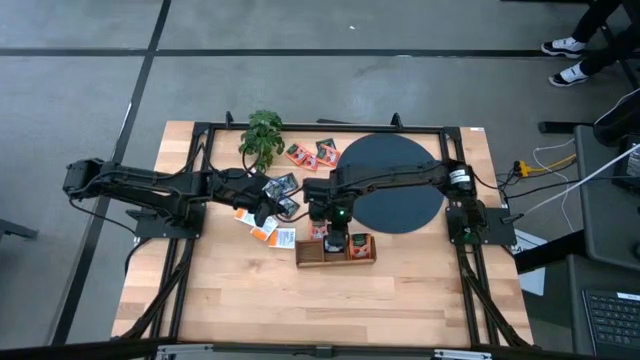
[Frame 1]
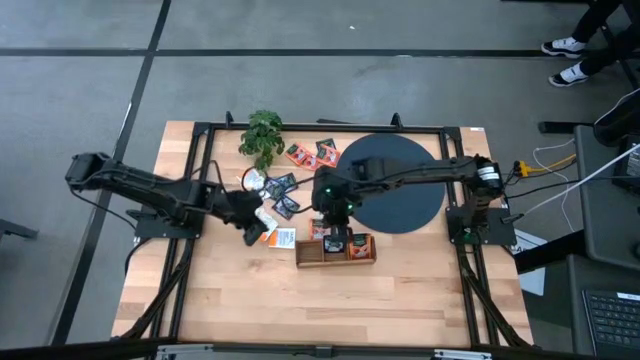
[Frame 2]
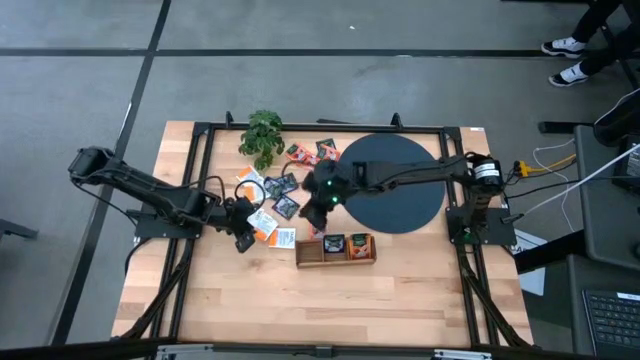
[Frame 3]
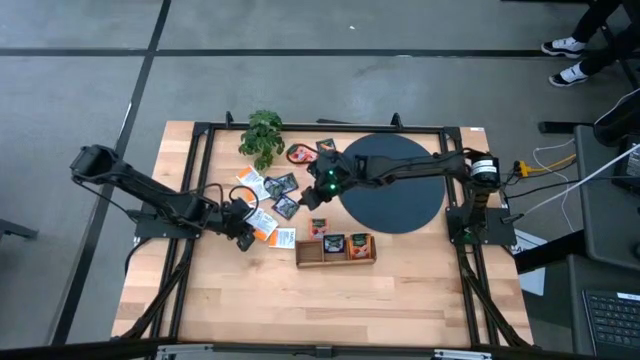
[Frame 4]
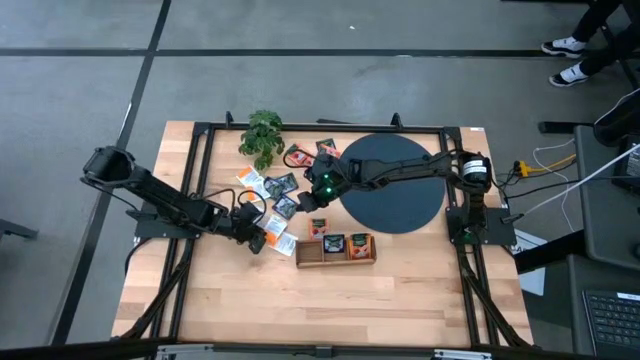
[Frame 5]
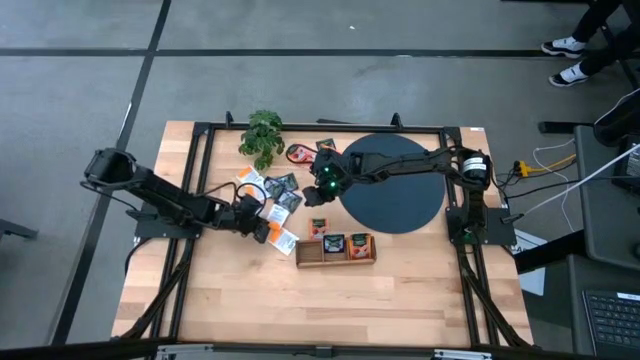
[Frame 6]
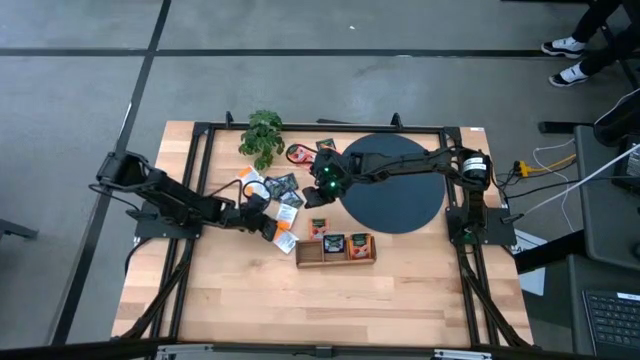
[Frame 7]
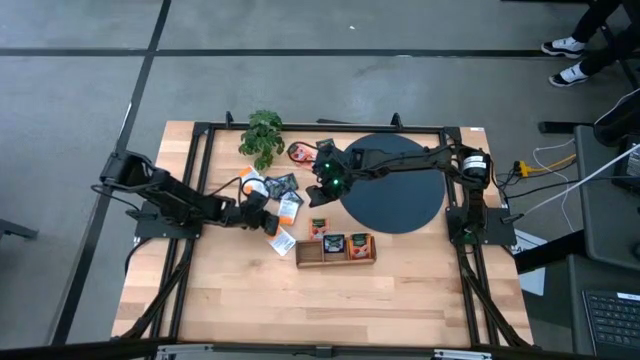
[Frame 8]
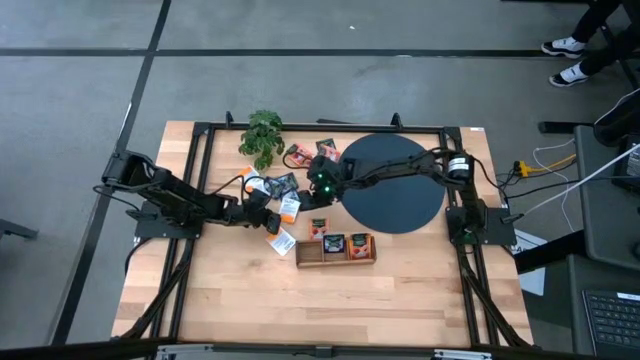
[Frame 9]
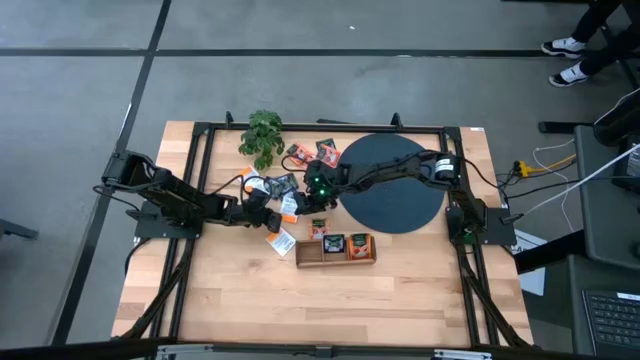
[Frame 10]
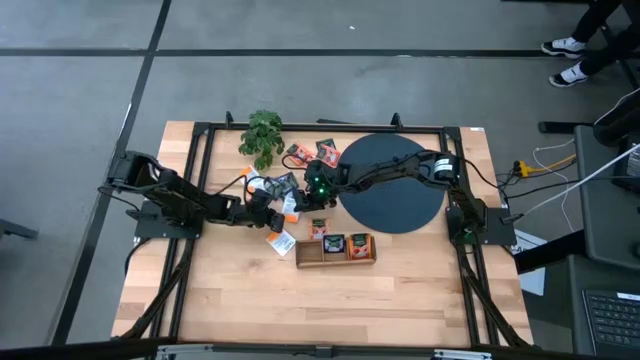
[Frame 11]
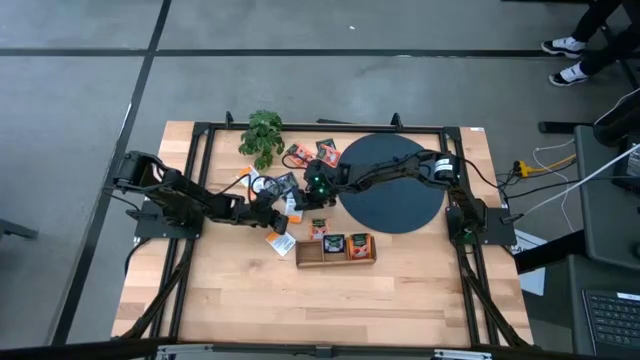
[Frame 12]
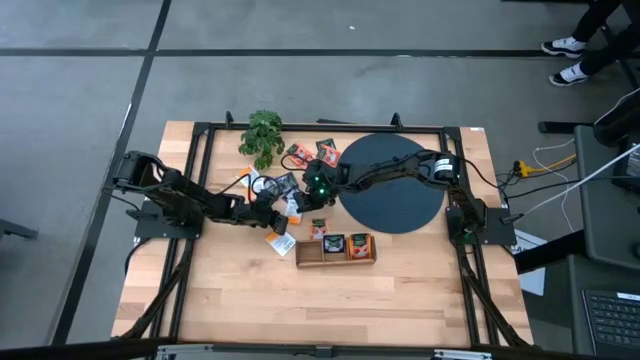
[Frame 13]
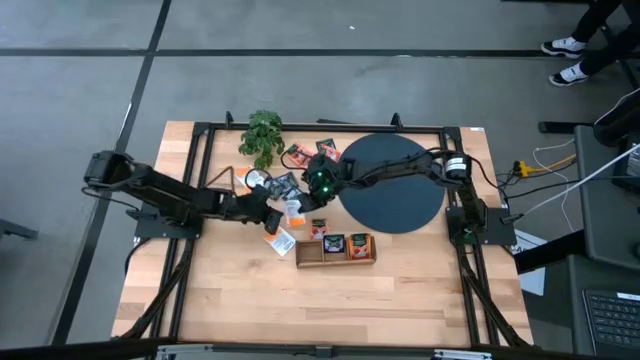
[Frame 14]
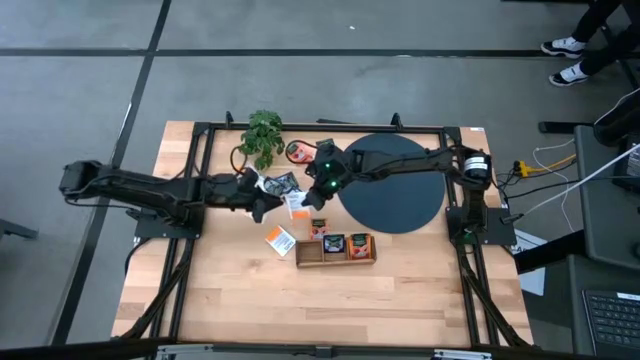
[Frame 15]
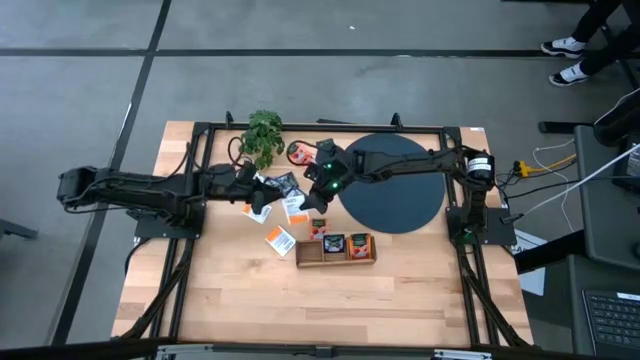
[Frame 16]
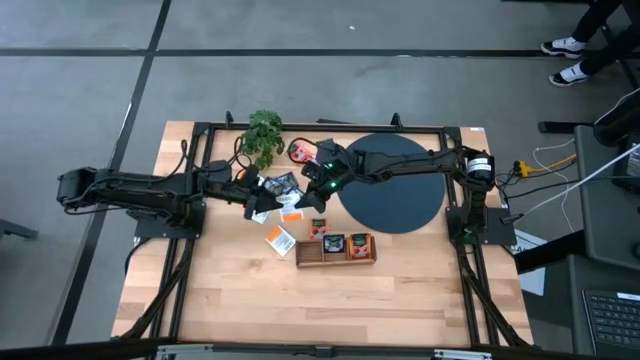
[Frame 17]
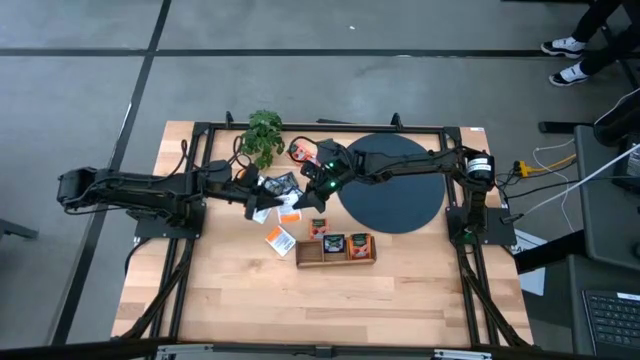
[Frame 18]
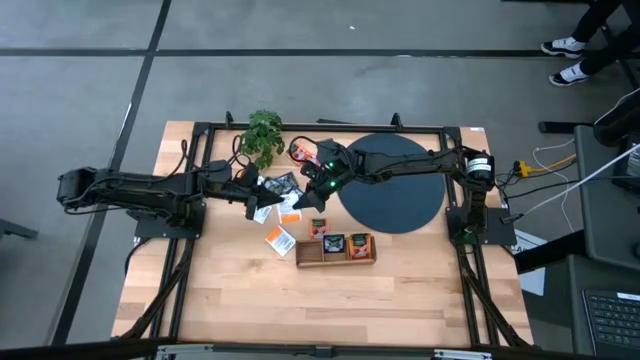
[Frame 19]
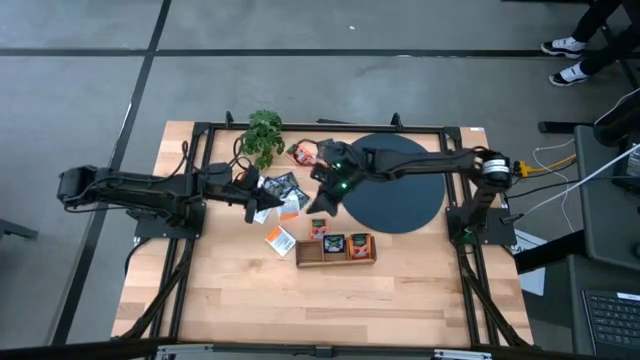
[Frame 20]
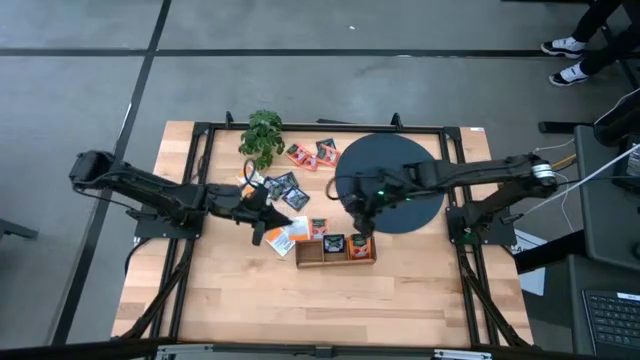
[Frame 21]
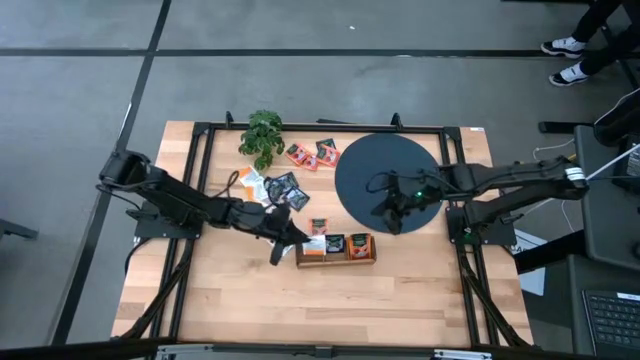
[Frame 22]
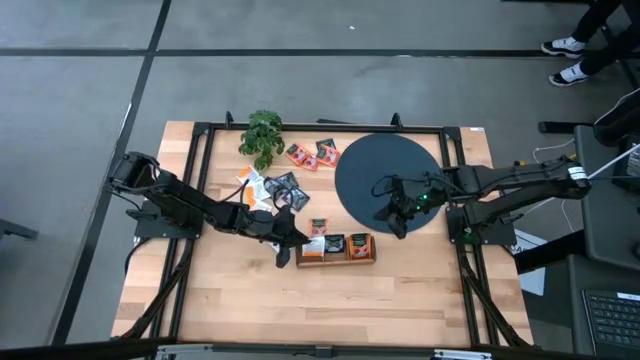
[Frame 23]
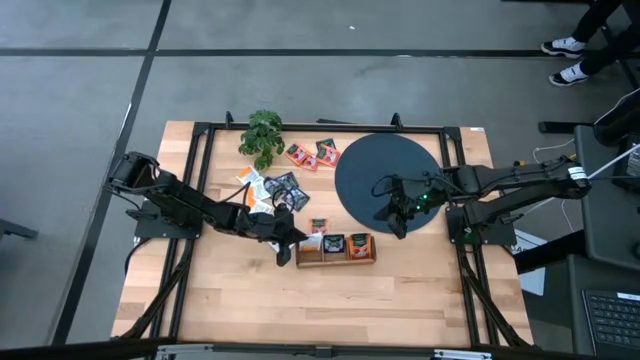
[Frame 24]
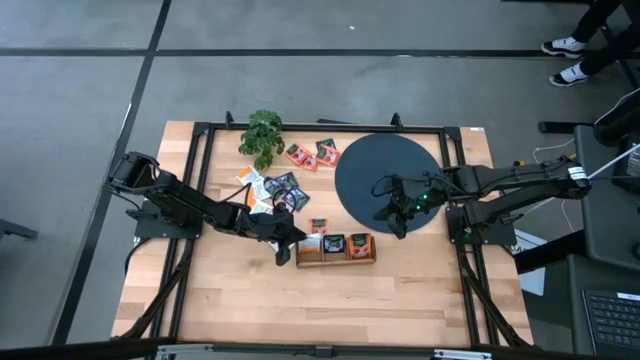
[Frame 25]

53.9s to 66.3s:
Task: Pick & Place Tea
Put the white tea bag into the left section of the wooden organizer

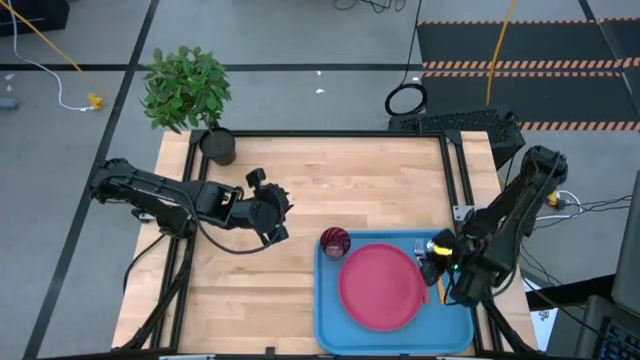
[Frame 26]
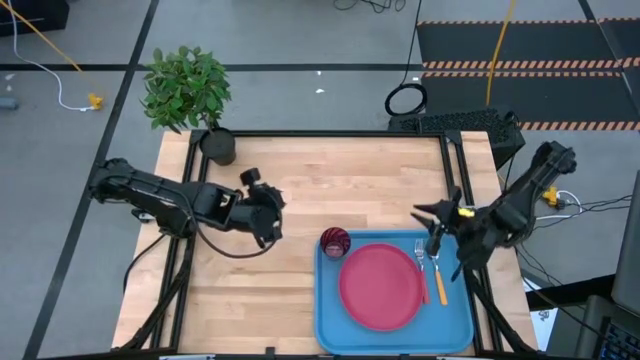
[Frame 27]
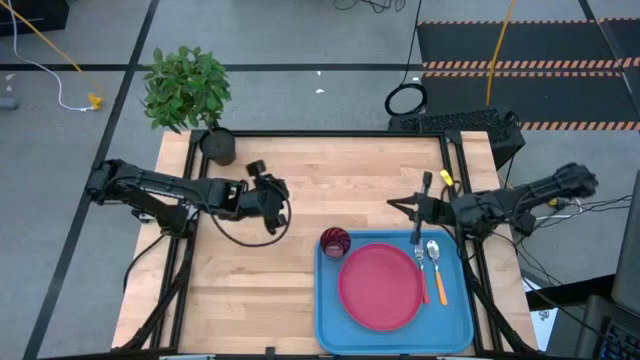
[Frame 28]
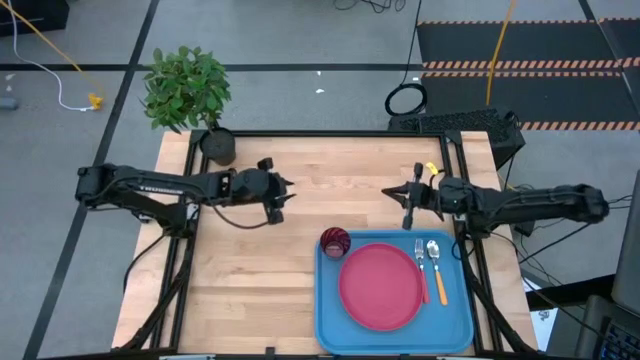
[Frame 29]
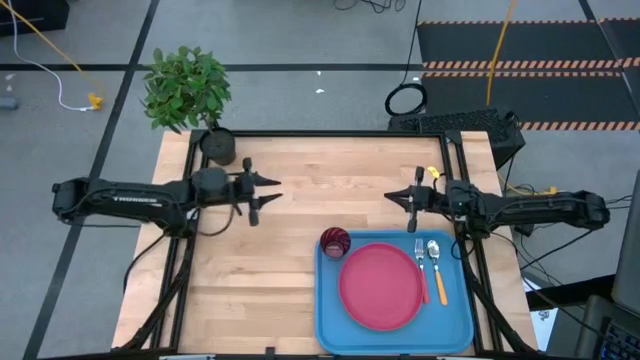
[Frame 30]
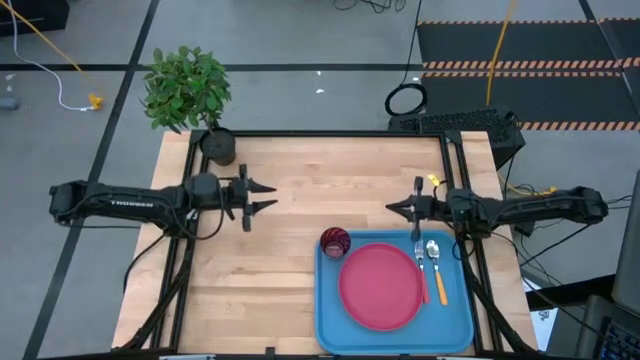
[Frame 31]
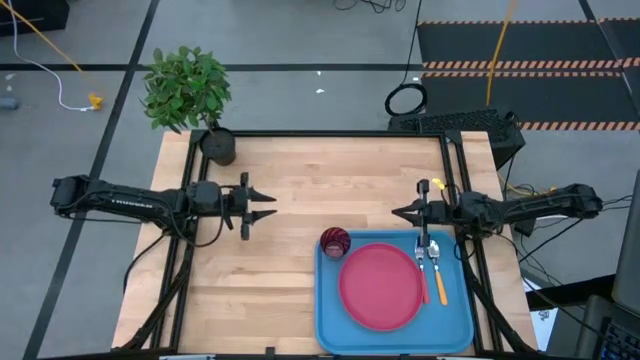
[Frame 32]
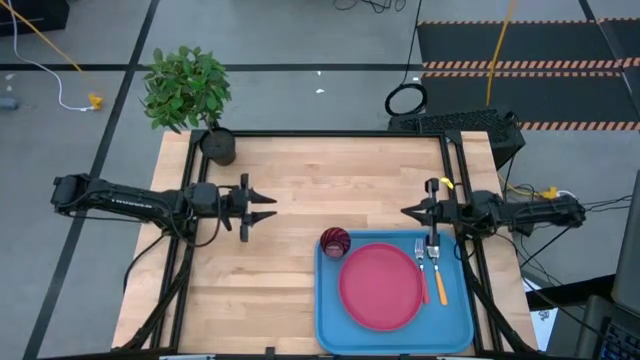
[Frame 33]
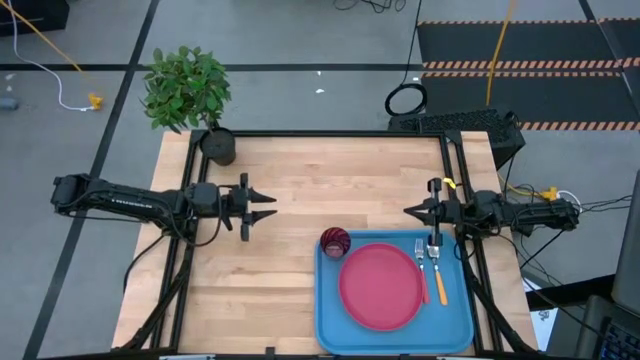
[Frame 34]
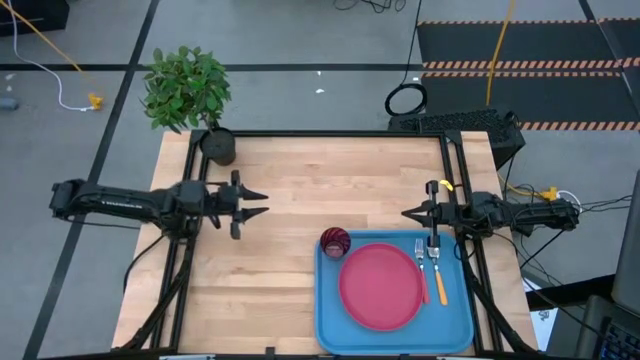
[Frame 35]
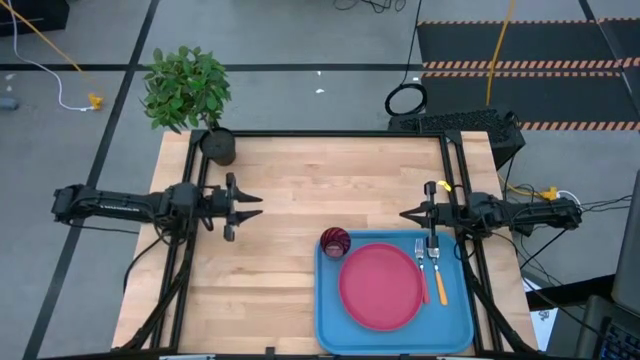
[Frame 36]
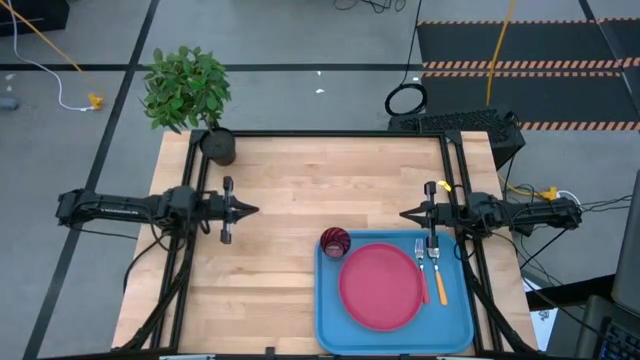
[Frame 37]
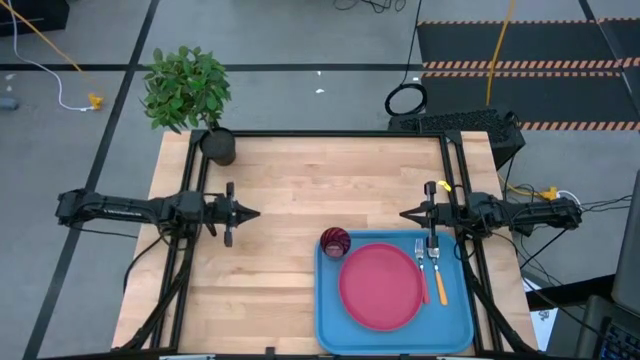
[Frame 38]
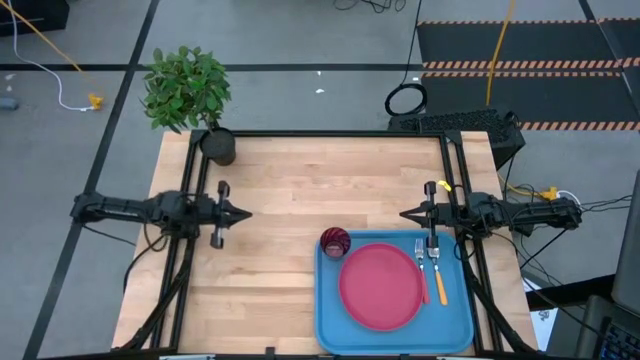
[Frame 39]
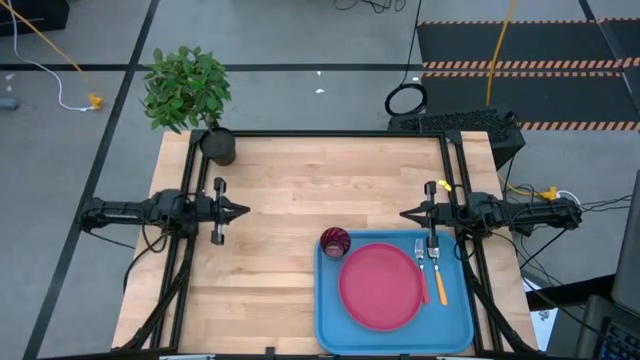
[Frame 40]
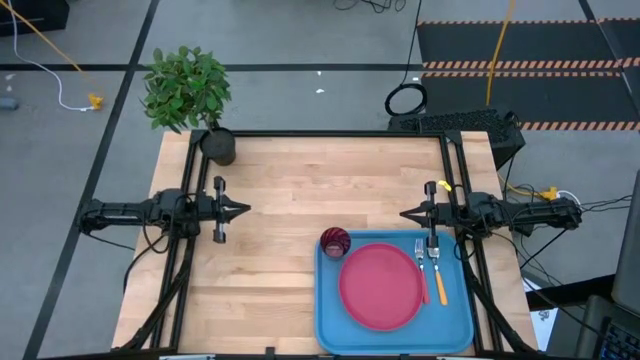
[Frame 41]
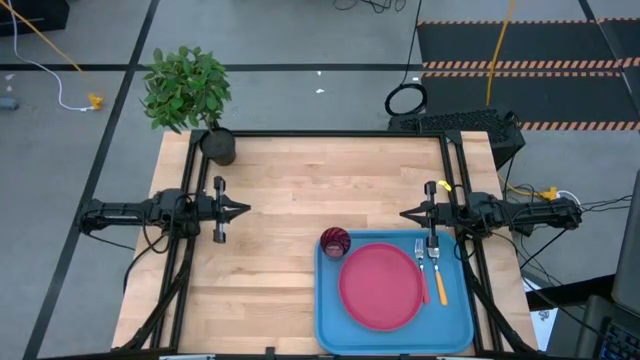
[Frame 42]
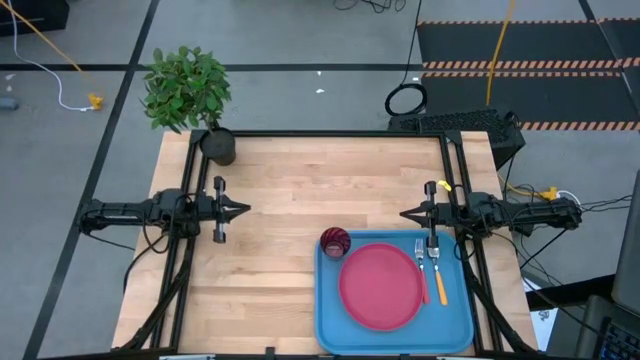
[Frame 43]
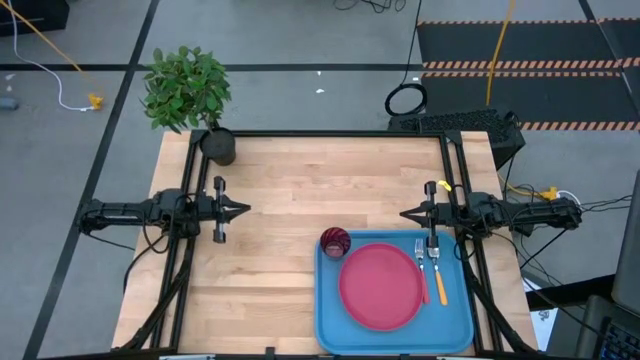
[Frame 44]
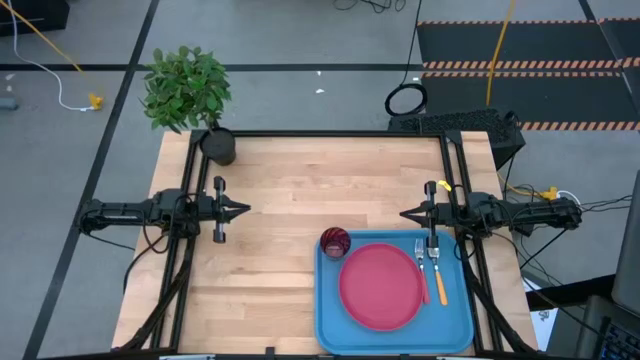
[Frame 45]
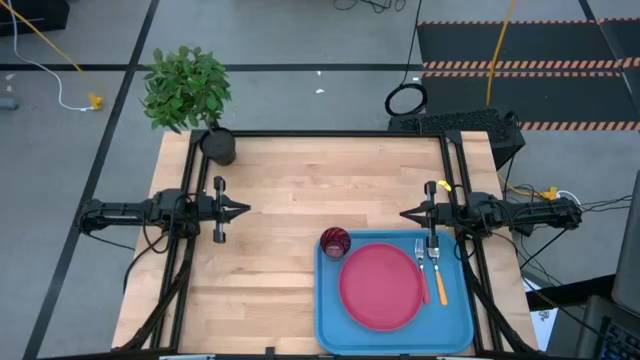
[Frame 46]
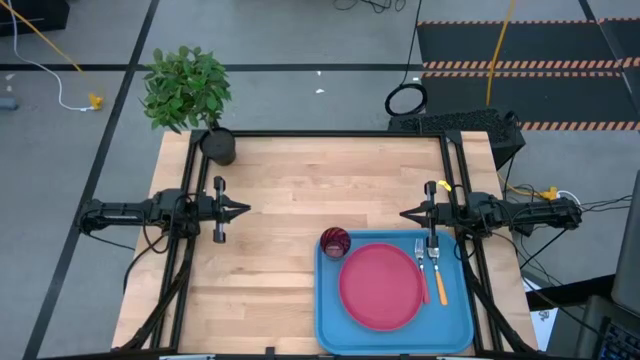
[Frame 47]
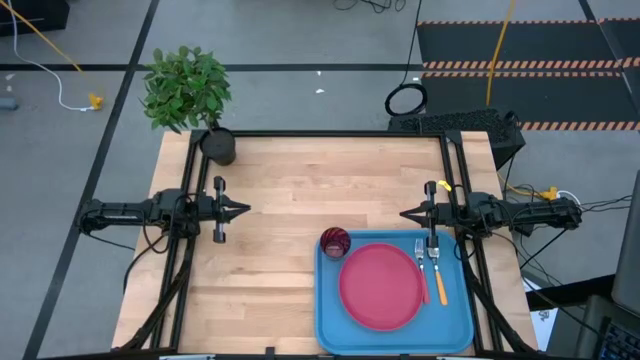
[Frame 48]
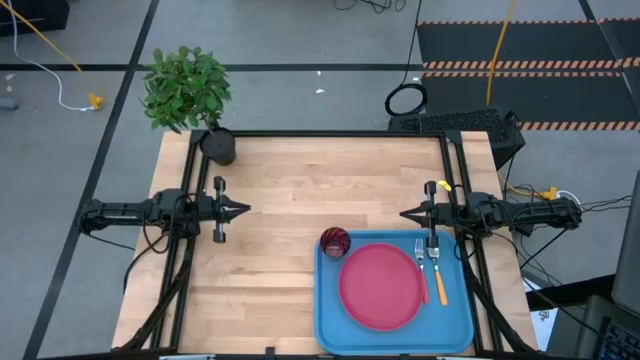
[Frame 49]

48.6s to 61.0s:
Task: Pick and place plate/cup/fork/spoon on tray
Return to Home Position
